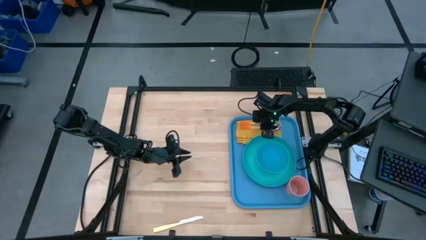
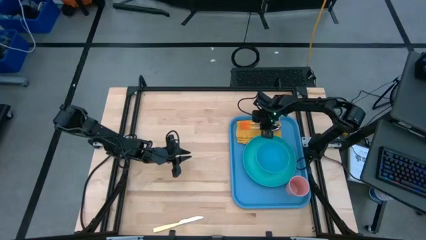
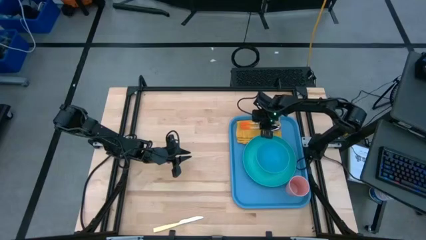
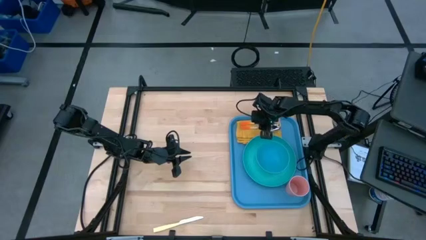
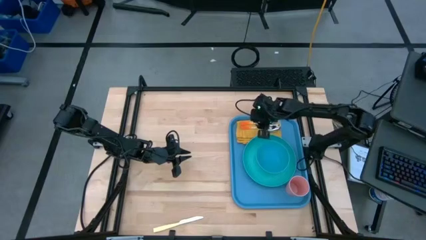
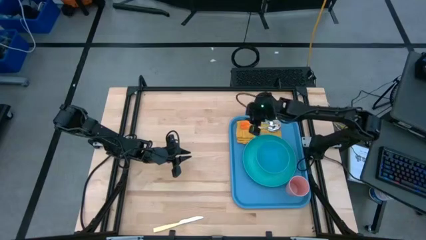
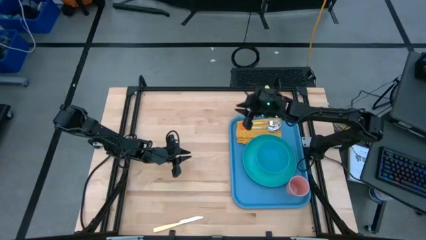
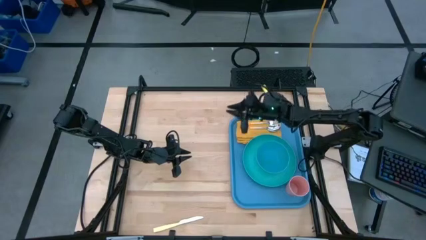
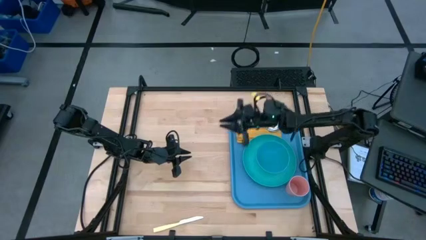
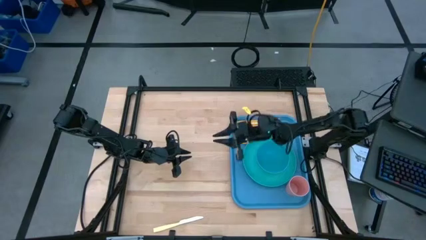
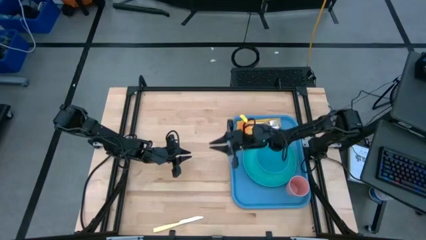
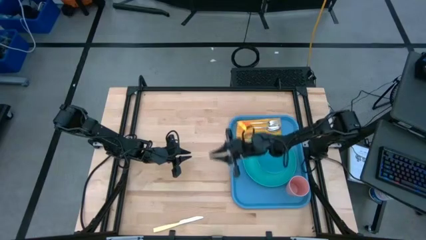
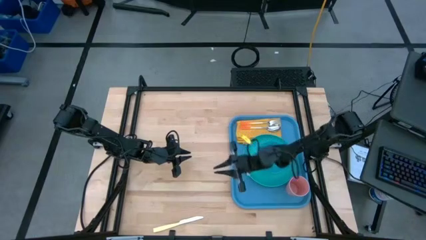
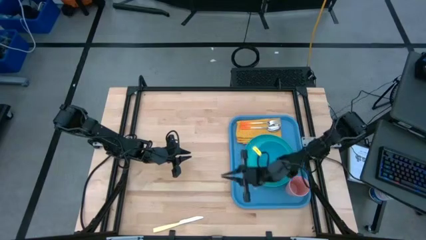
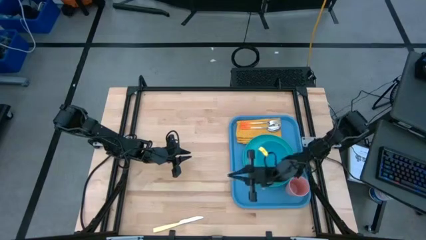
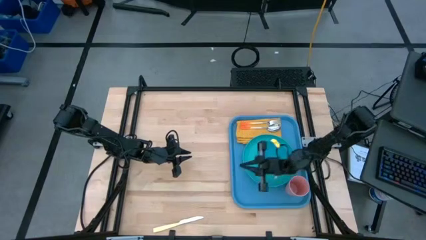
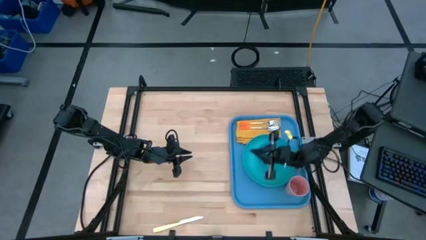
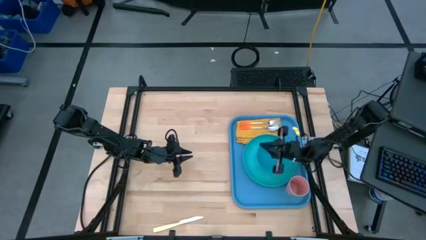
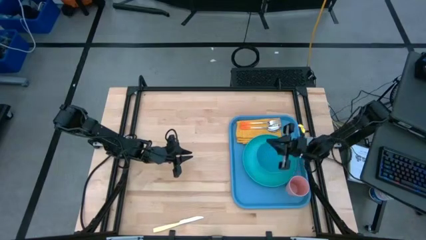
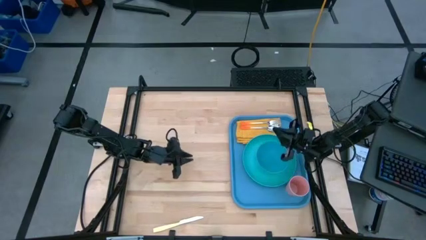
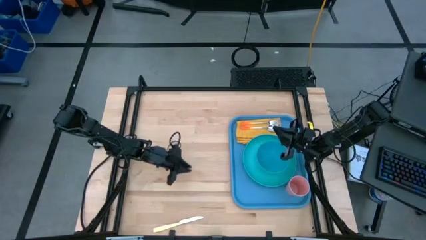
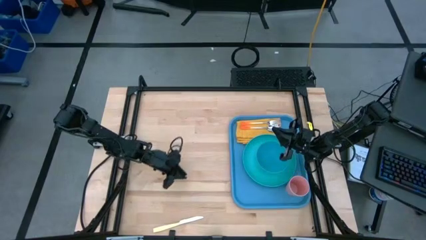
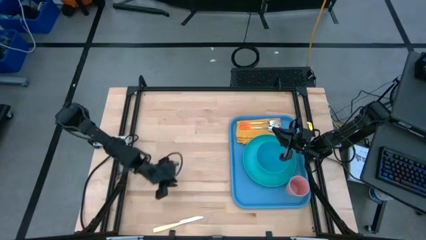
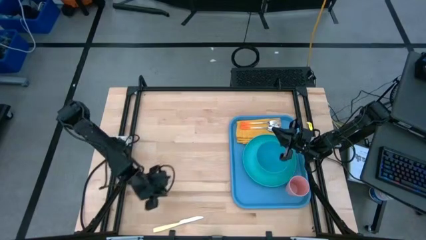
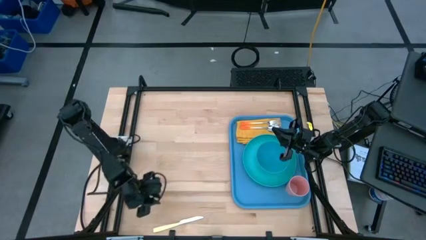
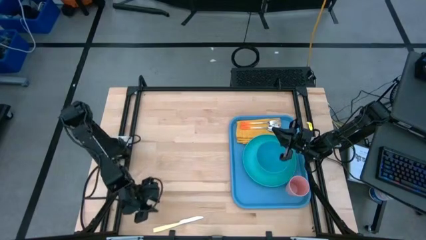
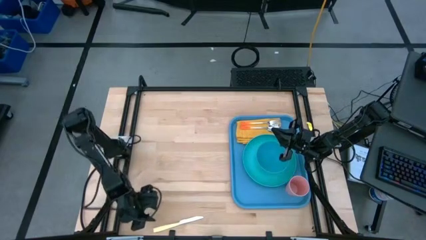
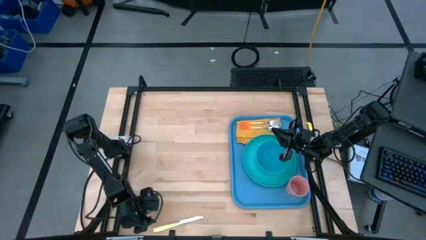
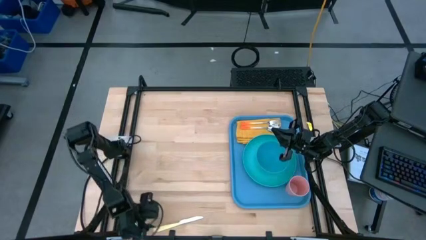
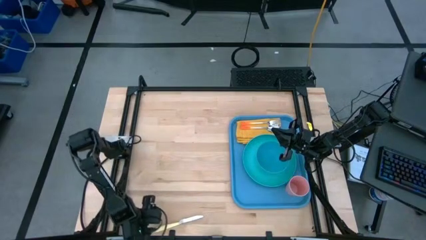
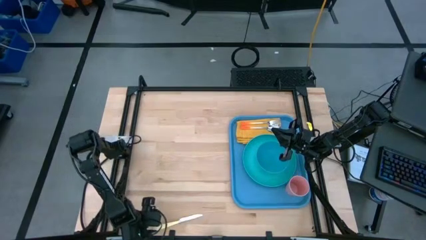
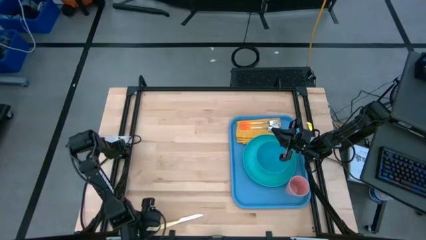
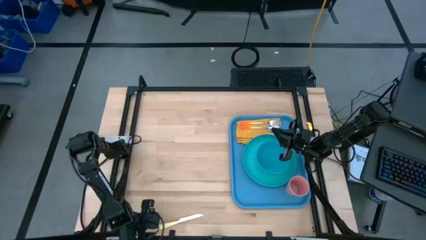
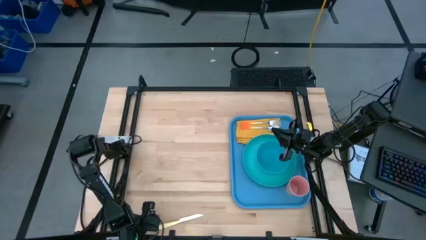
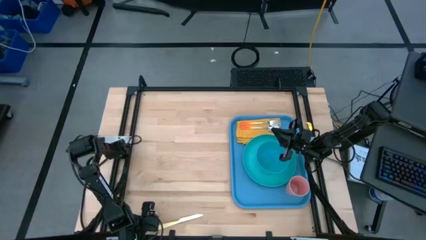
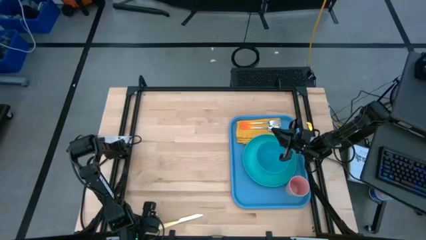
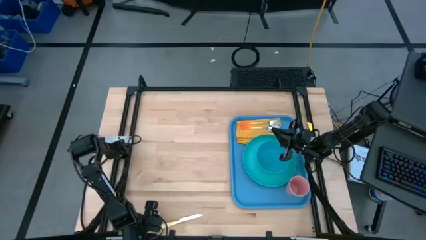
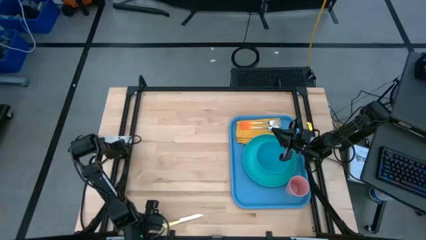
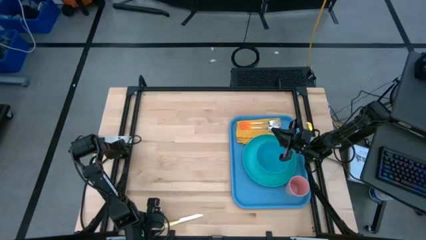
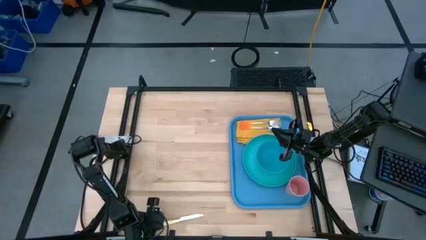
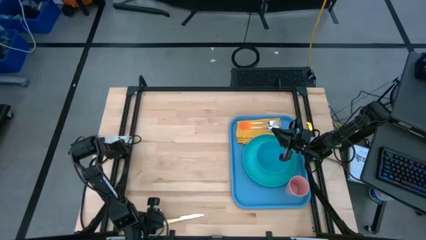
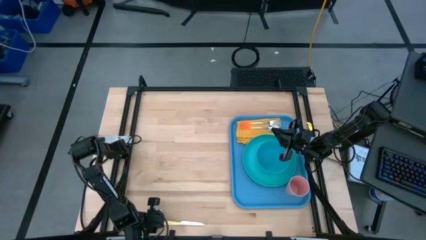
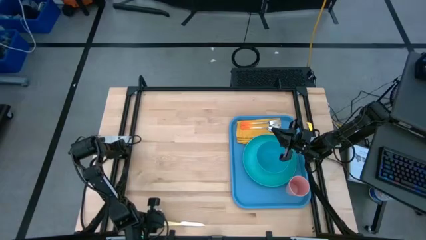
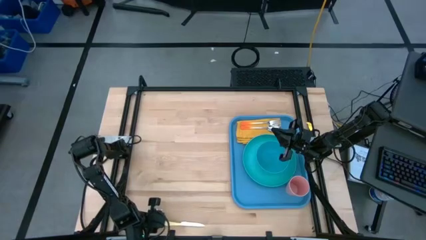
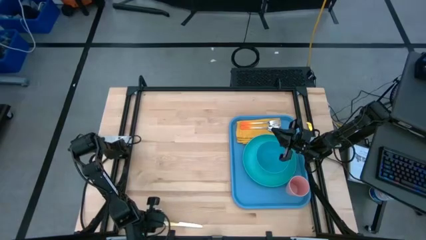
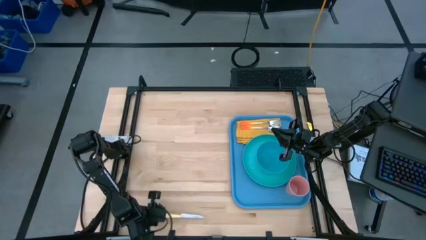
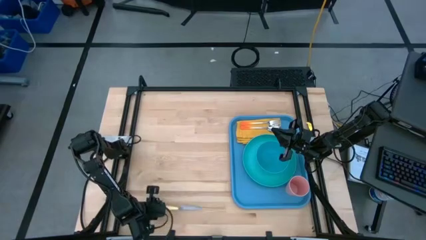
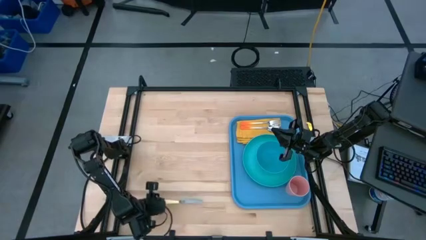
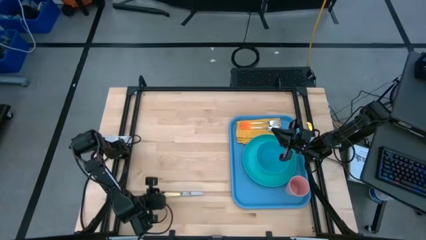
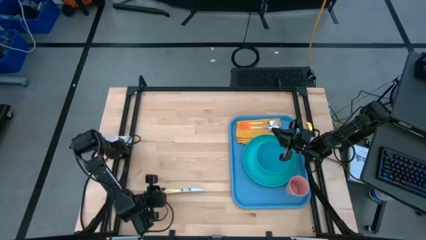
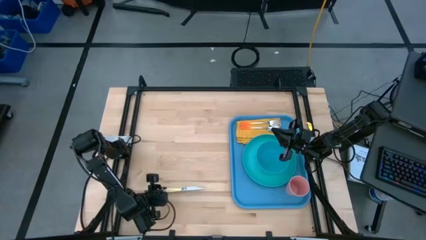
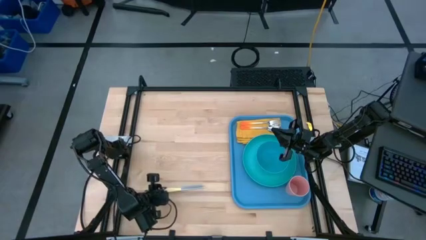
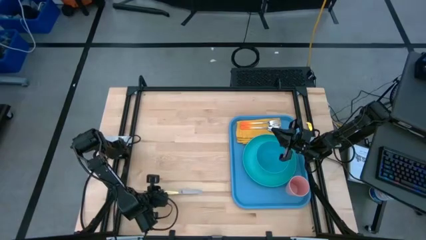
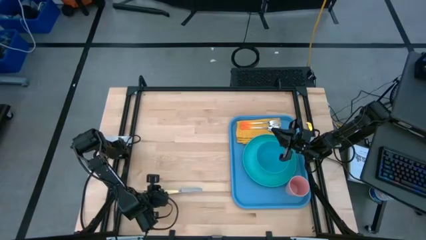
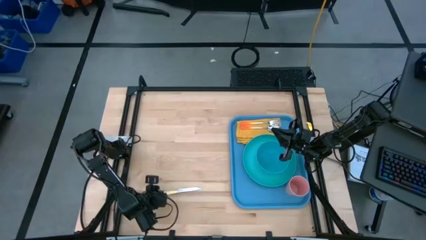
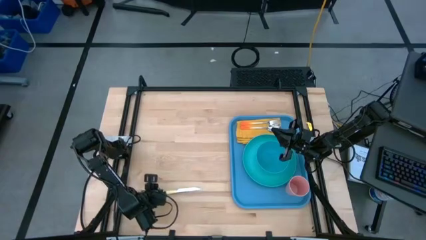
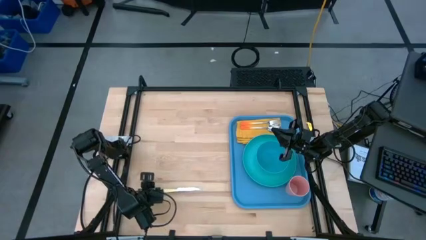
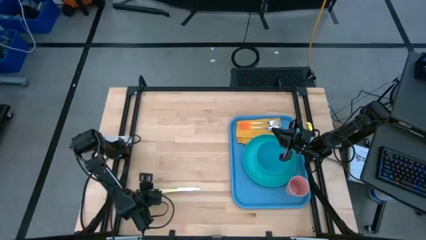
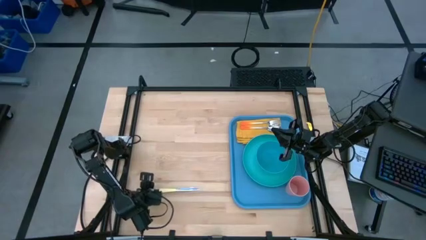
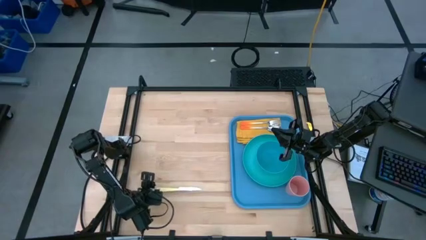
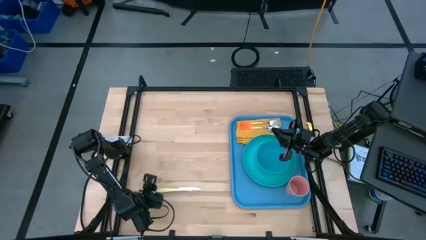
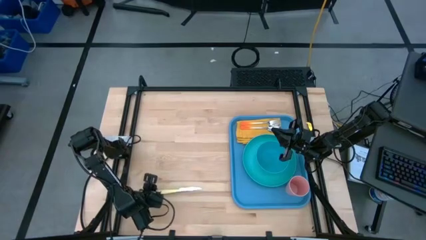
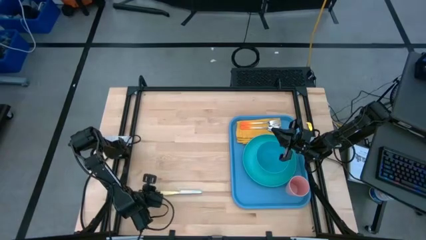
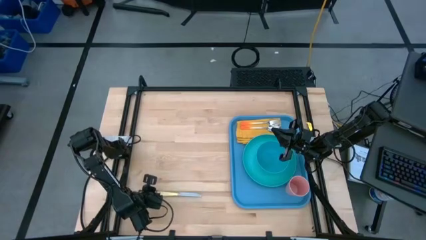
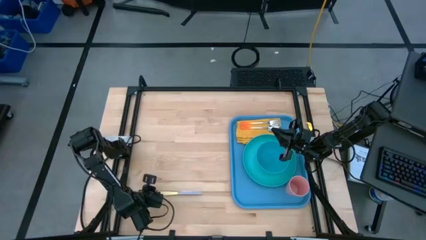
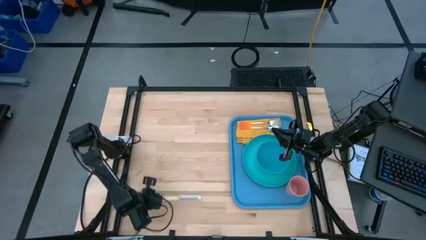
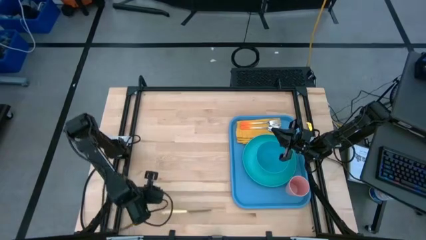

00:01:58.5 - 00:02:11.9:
Task: Set up tray
Put the light yellow knife on the napkin to the left of the blue plate
